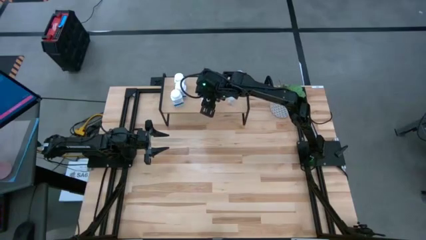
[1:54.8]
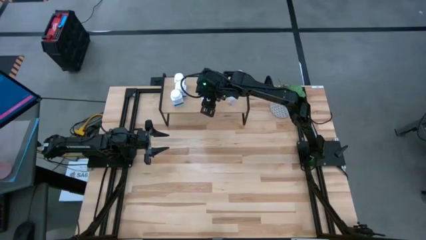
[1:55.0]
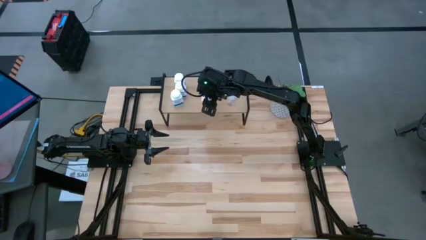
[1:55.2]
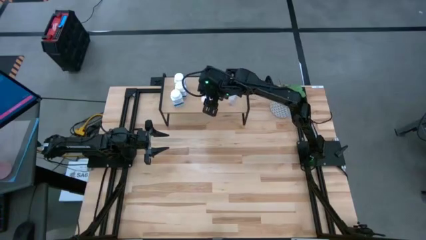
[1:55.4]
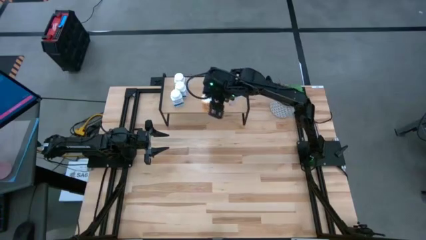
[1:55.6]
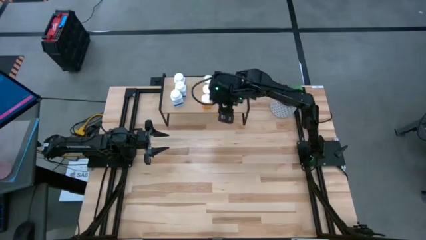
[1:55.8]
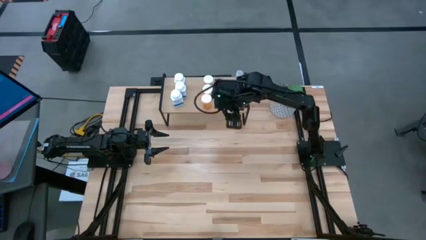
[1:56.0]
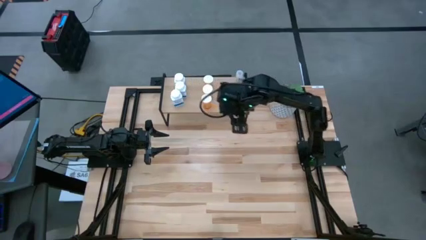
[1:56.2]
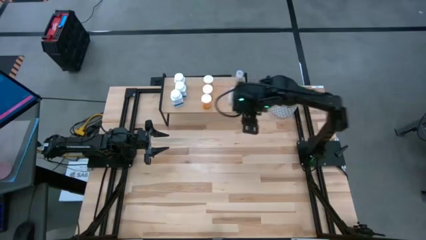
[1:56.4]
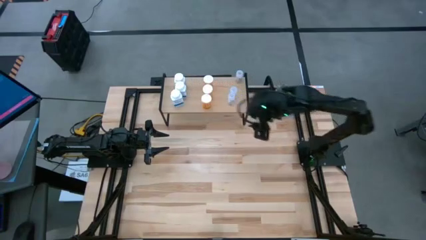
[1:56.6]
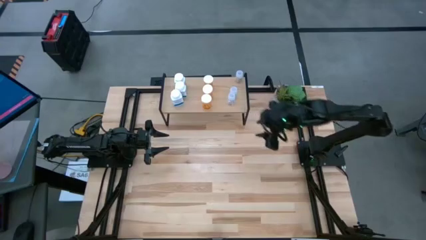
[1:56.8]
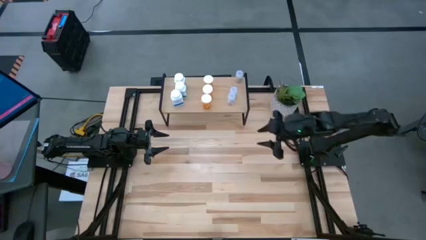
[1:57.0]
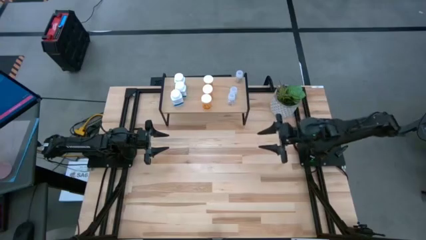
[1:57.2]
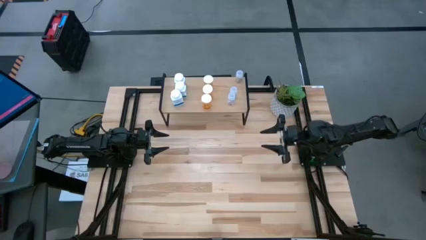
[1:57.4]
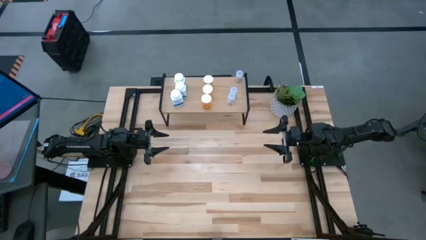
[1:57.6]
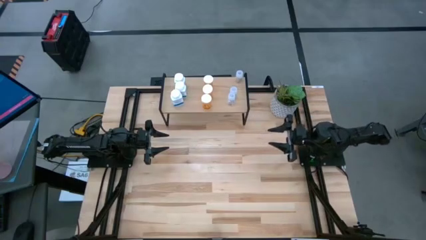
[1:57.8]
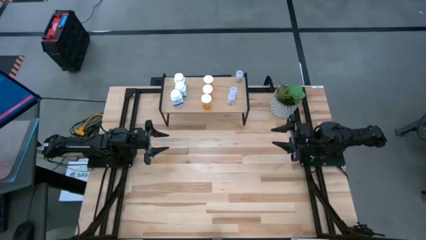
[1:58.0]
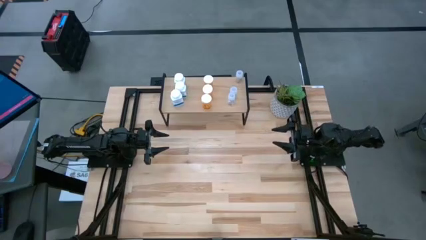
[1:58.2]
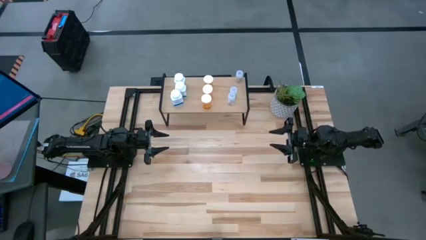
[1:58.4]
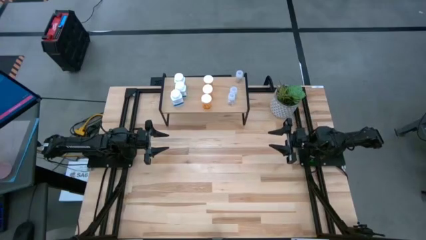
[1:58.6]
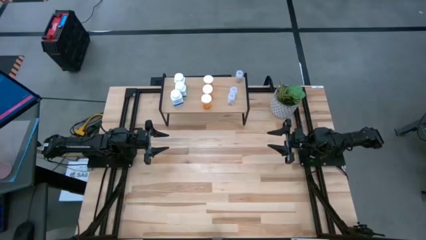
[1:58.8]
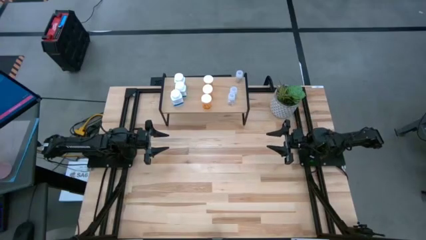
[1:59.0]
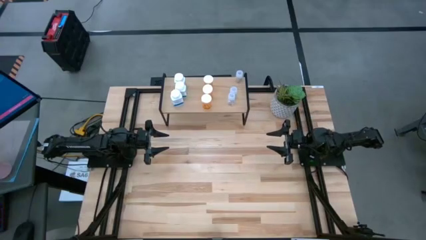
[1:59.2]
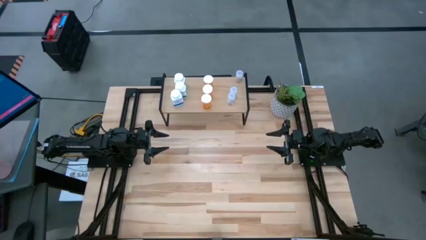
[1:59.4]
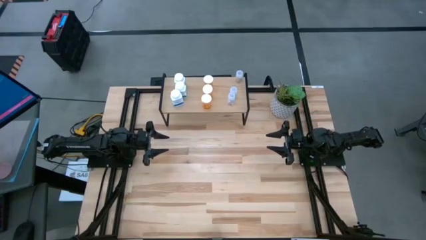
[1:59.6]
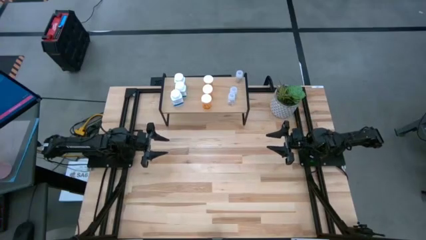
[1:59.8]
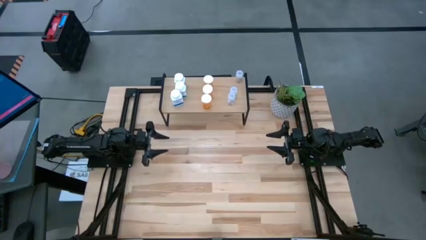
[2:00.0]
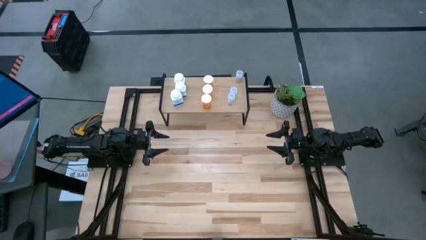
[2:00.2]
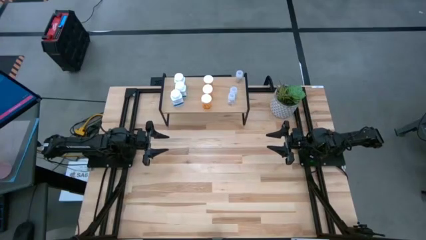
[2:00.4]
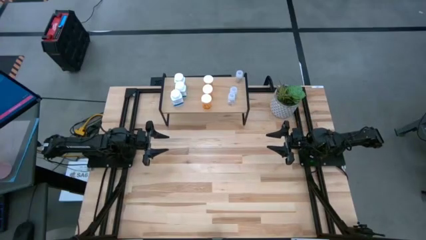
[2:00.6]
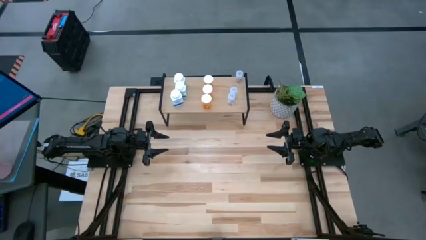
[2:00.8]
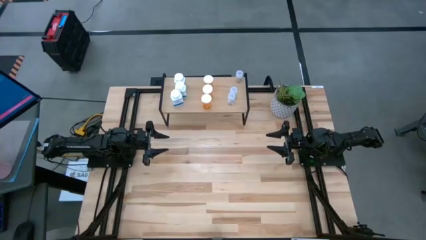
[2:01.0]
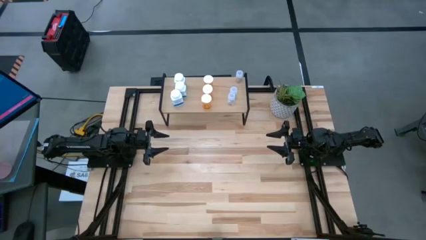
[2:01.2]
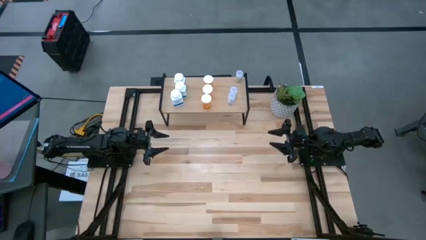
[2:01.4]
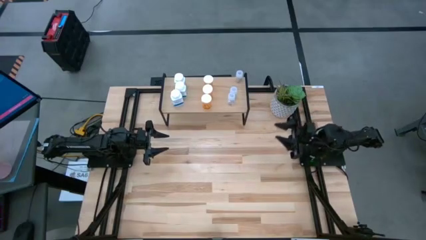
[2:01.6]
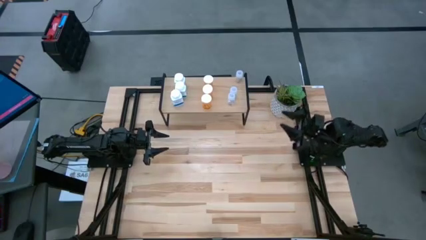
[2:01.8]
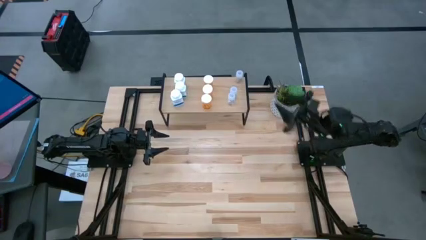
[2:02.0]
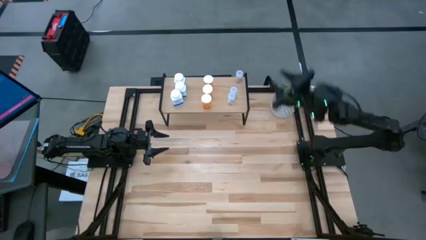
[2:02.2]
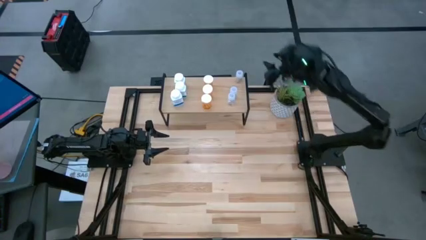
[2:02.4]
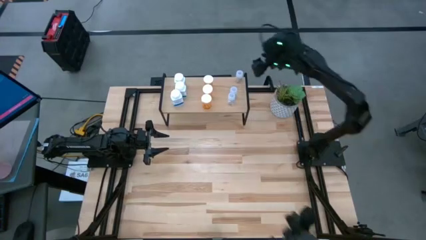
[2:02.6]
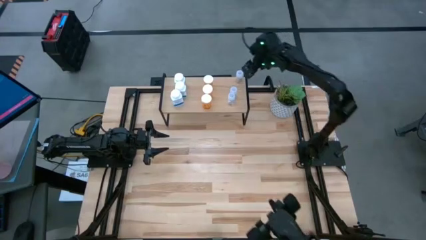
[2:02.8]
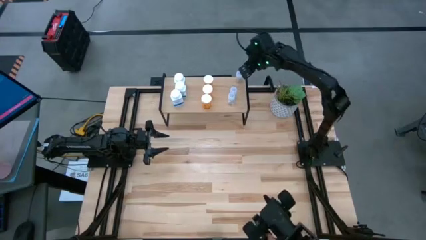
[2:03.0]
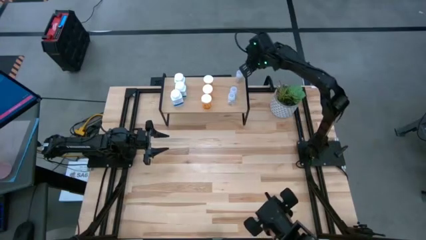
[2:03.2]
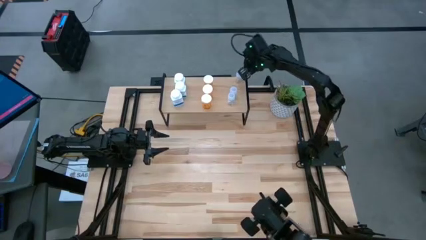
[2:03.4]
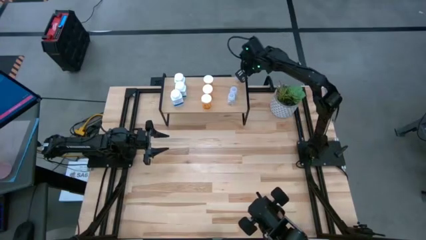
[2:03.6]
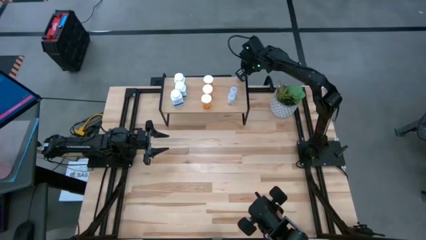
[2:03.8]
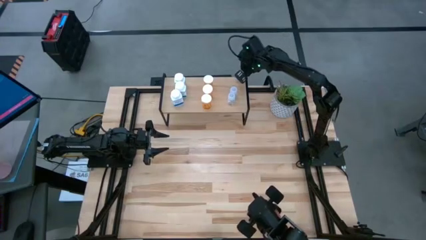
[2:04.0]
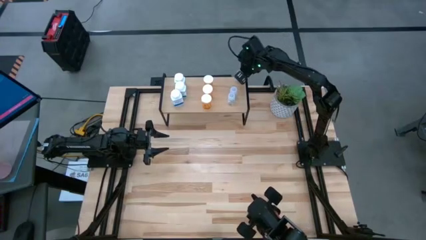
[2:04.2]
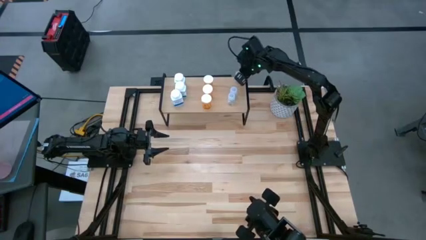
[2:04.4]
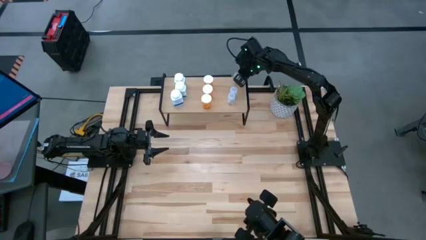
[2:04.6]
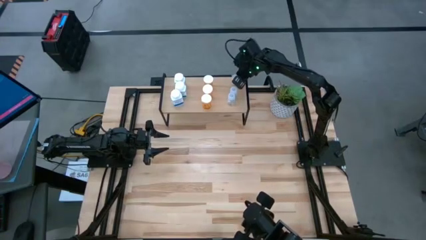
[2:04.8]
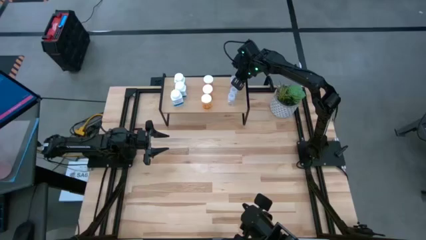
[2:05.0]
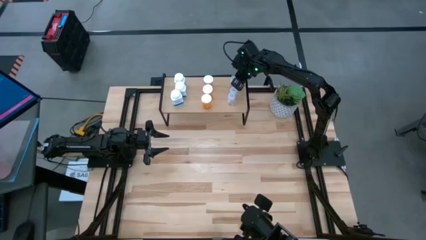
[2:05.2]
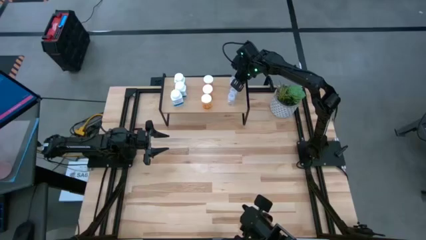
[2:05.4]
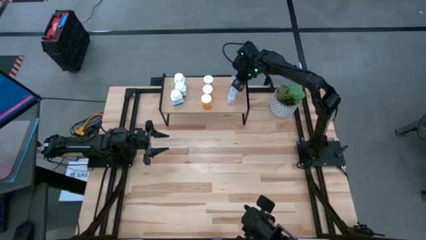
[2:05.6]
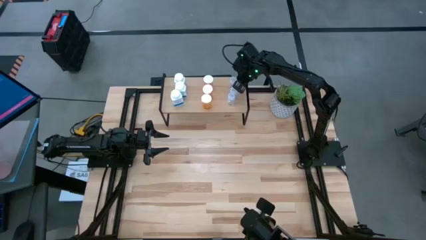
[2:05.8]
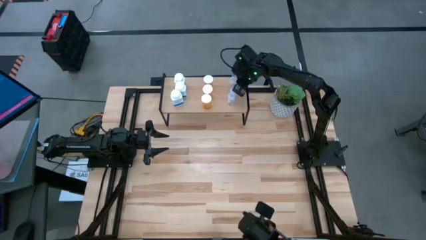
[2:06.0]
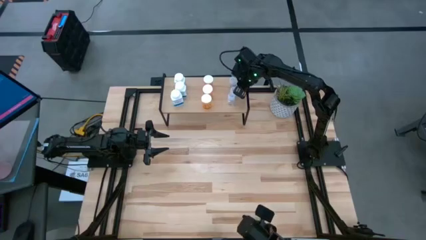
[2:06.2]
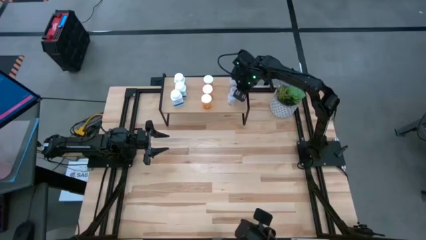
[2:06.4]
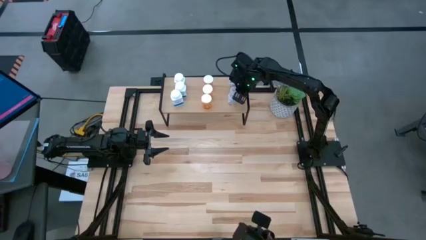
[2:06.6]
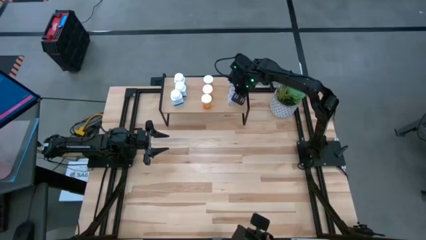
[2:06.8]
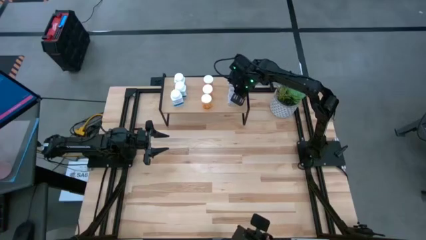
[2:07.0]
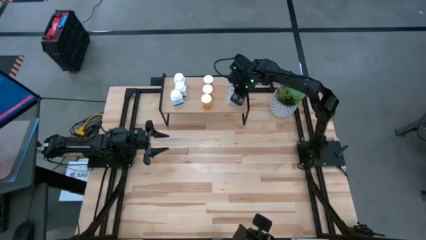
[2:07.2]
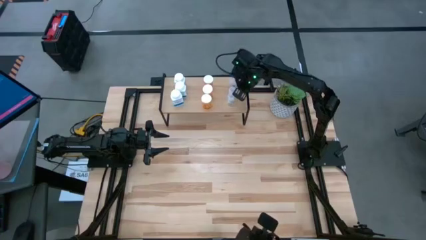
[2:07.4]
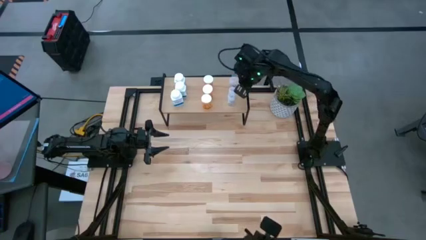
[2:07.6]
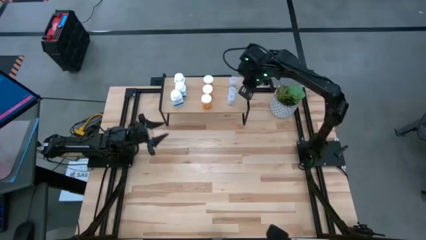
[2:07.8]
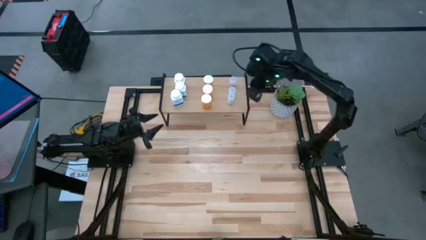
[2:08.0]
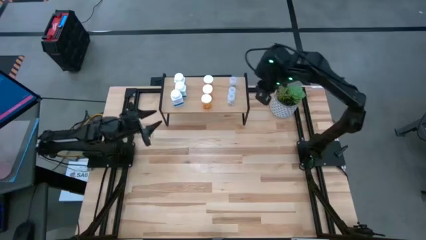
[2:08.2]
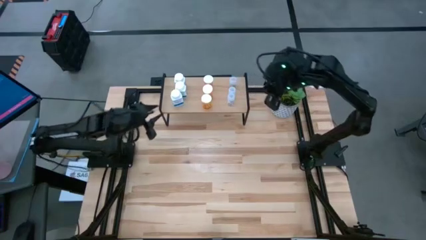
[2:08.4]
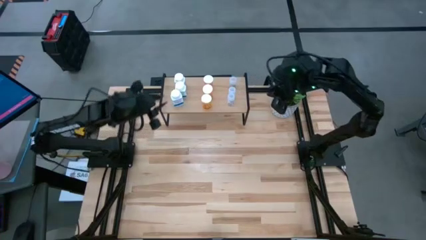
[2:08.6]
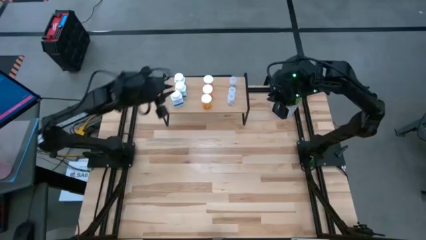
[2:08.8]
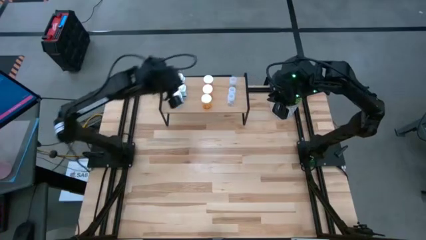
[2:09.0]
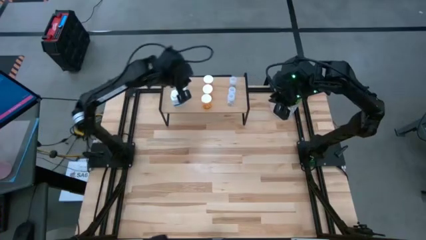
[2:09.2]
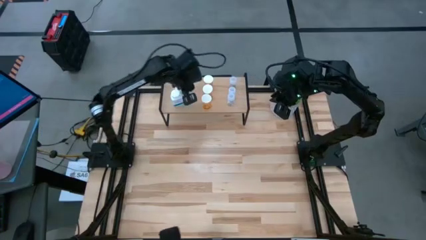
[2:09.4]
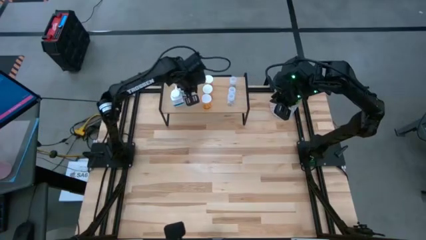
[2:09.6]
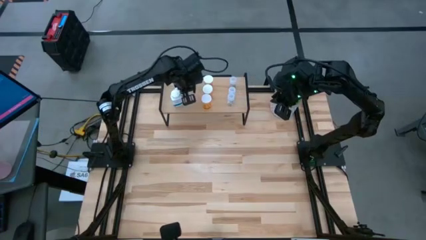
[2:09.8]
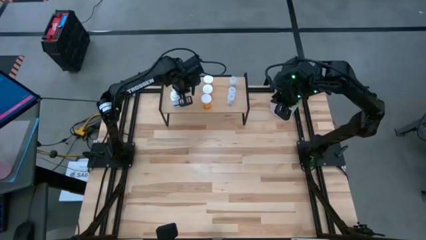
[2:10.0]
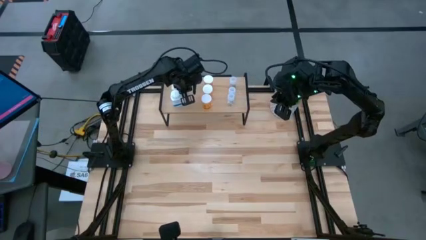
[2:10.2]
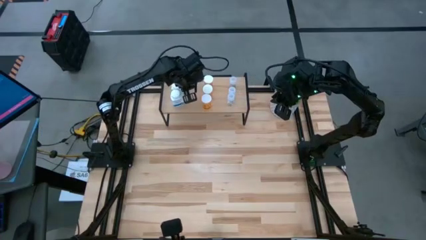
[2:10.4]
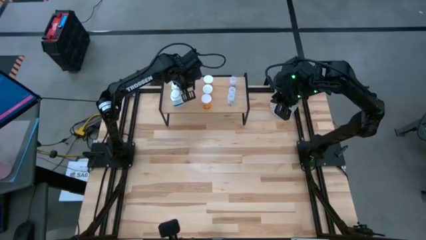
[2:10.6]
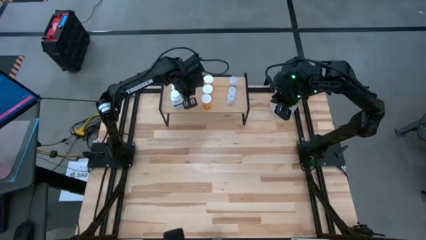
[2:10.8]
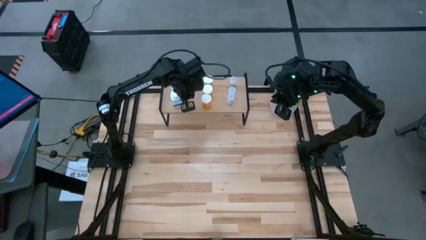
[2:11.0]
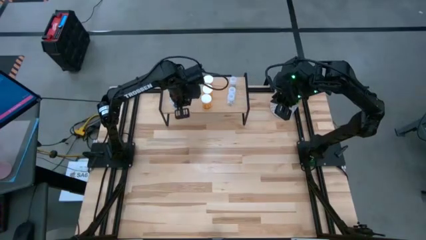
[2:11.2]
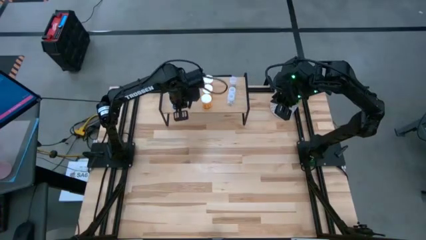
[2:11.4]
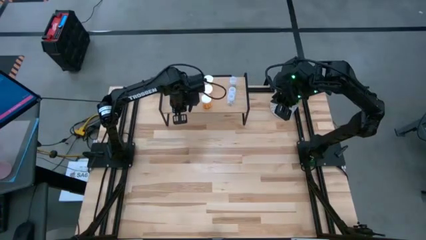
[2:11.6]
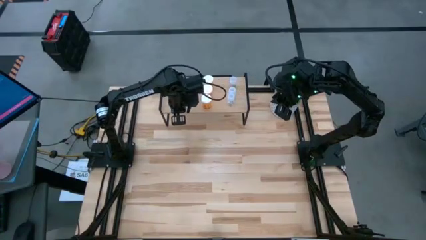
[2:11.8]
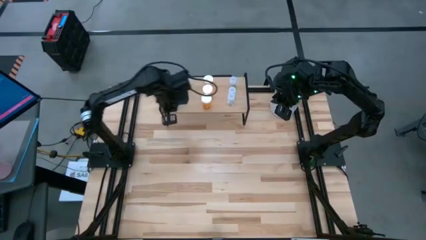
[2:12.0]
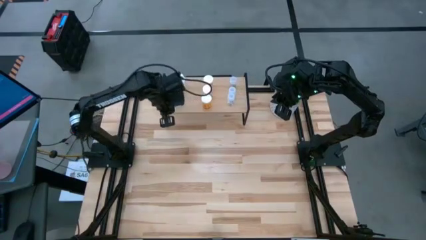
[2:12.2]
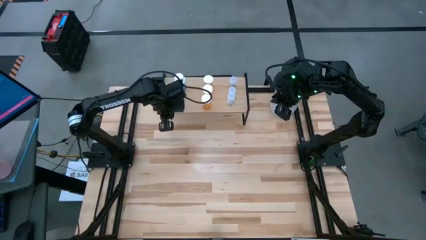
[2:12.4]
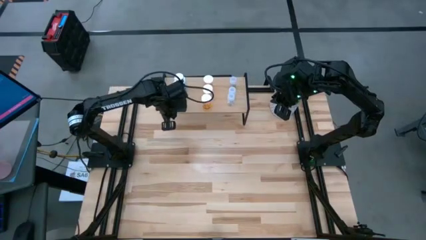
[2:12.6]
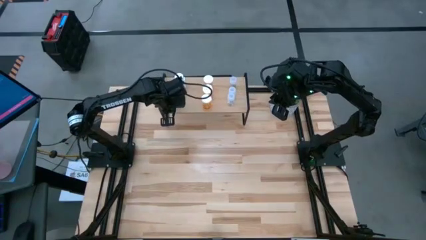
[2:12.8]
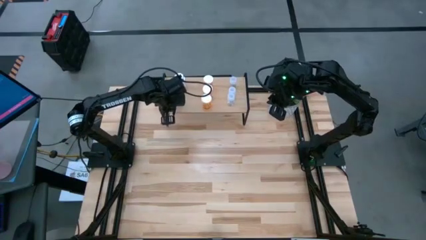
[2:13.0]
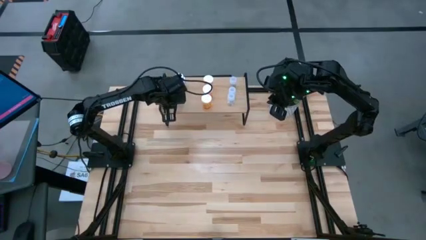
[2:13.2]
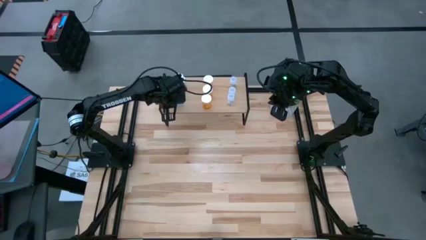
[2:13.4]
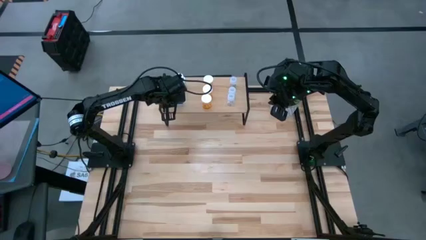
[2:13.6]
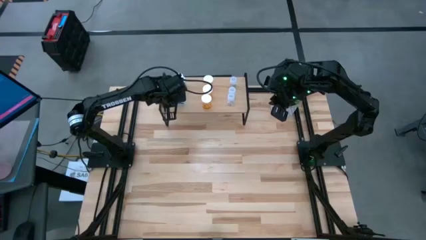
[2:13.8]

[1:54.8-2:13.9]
Task: Pick and place medicine bottles onto shelf by color
Adjust the pill bottles on the shelf
